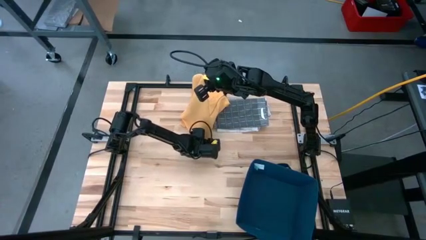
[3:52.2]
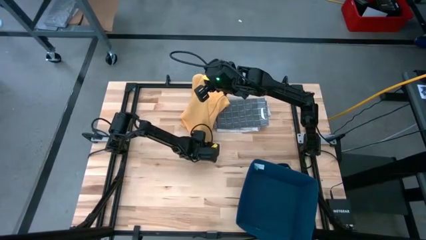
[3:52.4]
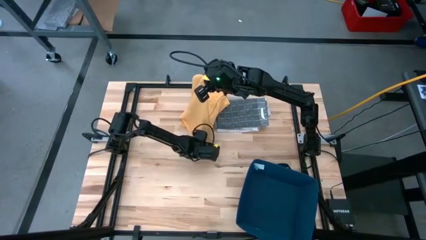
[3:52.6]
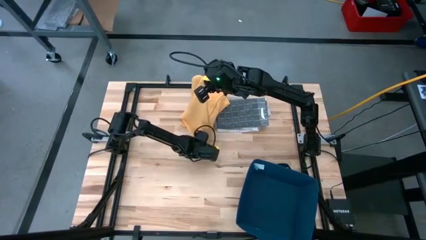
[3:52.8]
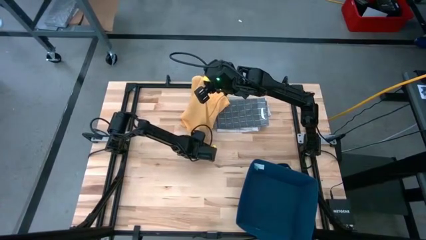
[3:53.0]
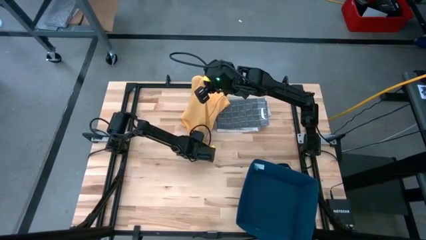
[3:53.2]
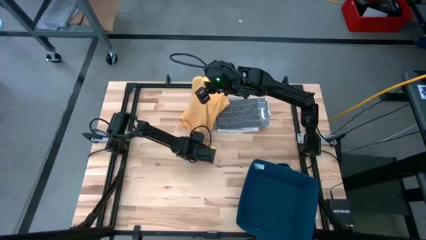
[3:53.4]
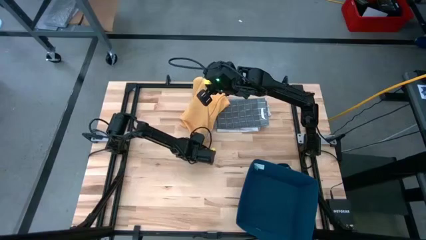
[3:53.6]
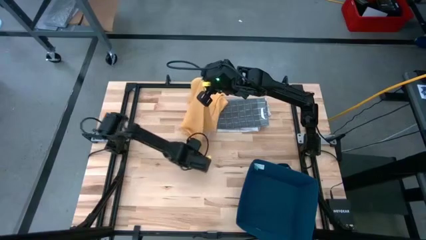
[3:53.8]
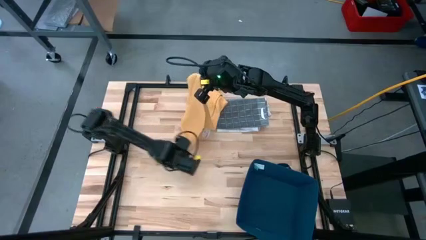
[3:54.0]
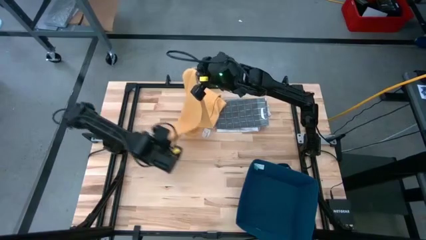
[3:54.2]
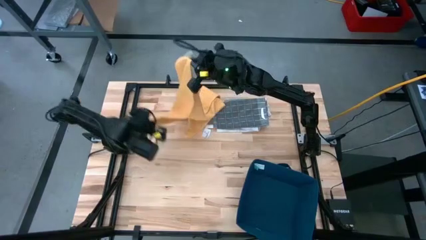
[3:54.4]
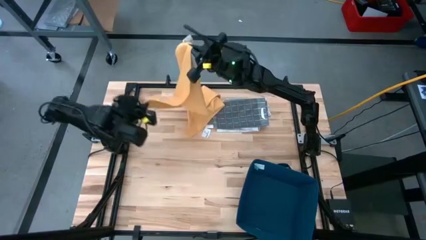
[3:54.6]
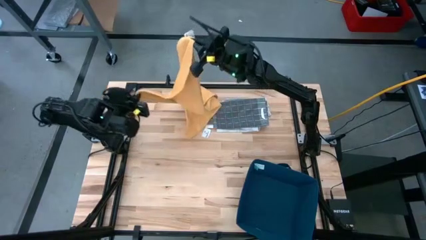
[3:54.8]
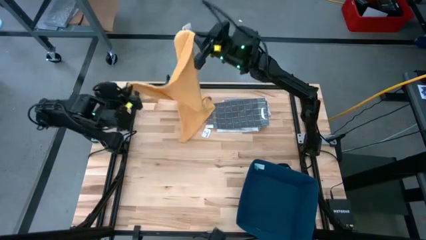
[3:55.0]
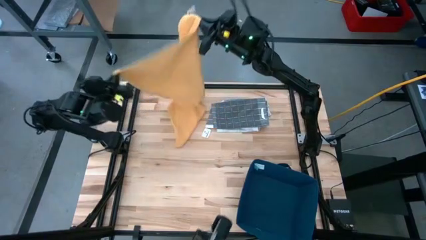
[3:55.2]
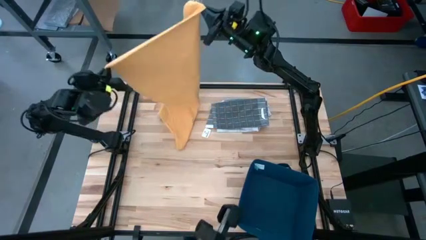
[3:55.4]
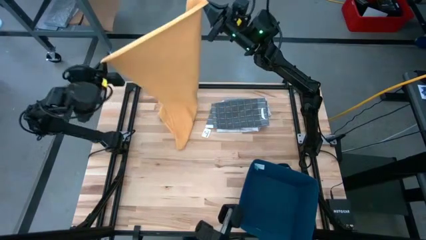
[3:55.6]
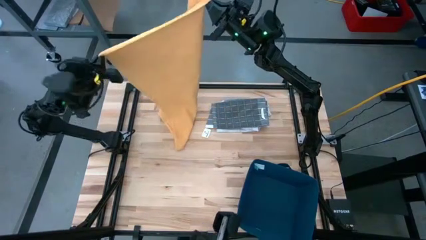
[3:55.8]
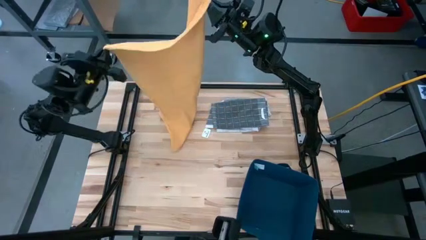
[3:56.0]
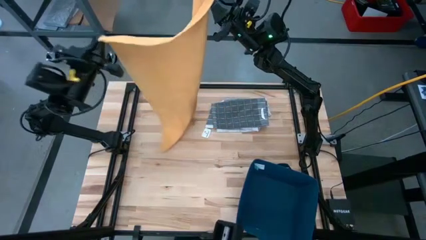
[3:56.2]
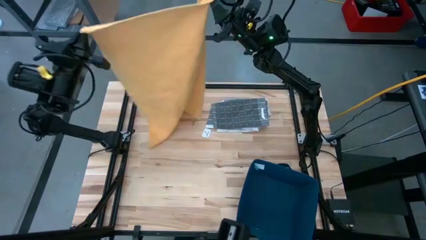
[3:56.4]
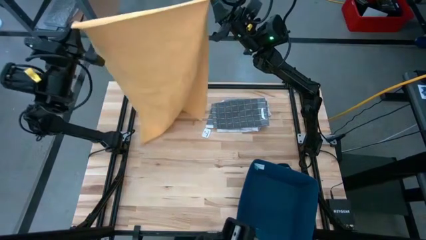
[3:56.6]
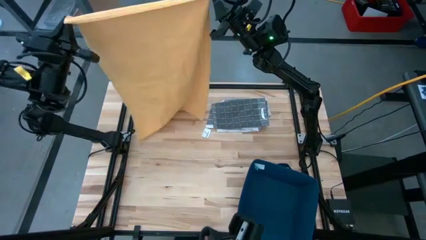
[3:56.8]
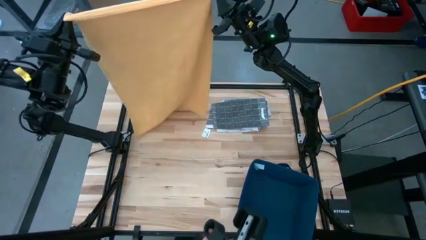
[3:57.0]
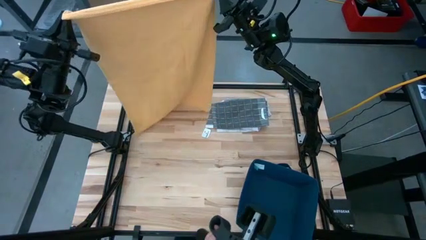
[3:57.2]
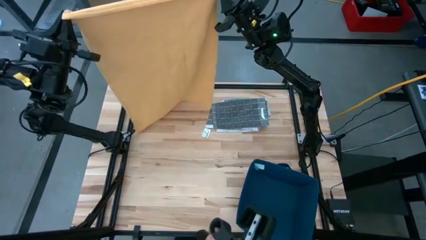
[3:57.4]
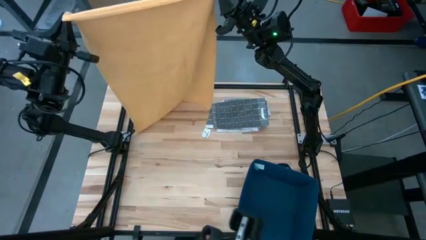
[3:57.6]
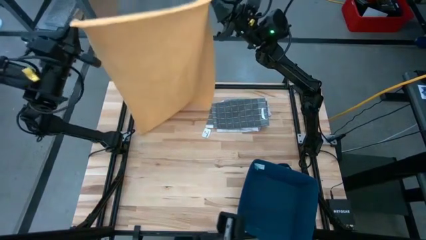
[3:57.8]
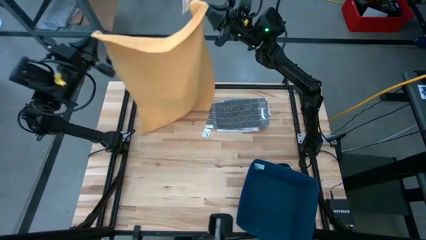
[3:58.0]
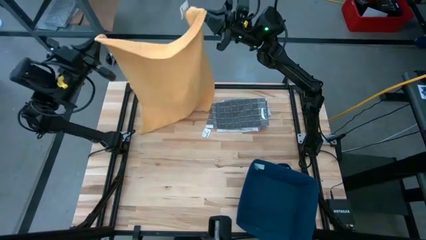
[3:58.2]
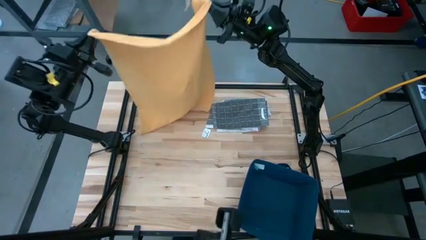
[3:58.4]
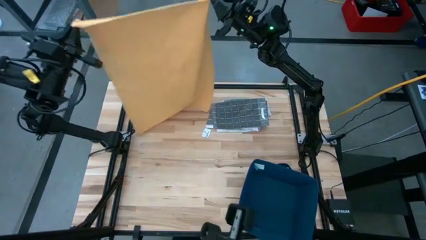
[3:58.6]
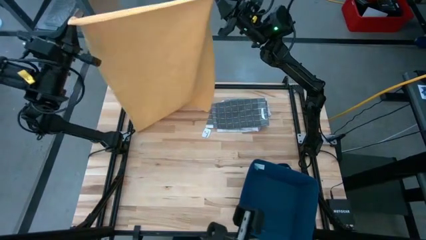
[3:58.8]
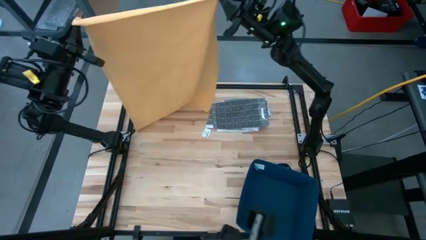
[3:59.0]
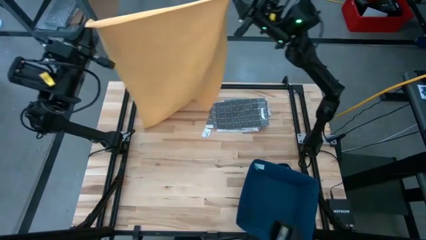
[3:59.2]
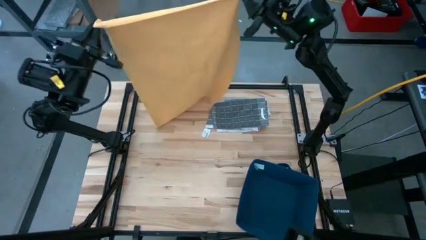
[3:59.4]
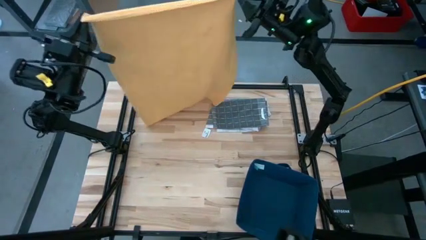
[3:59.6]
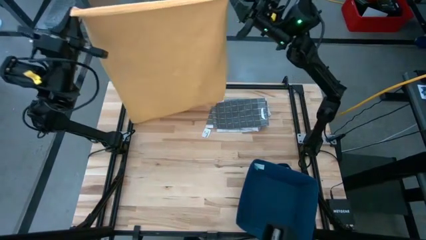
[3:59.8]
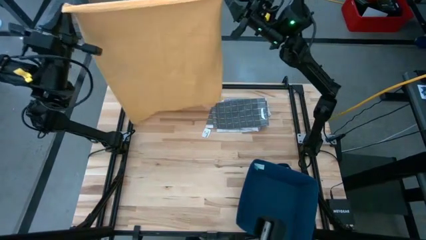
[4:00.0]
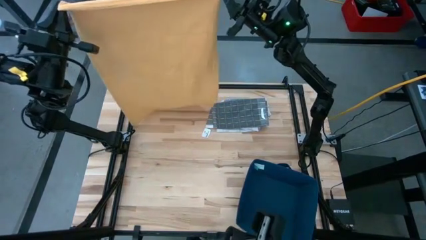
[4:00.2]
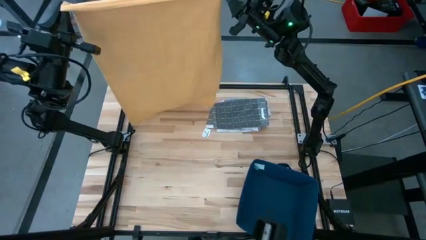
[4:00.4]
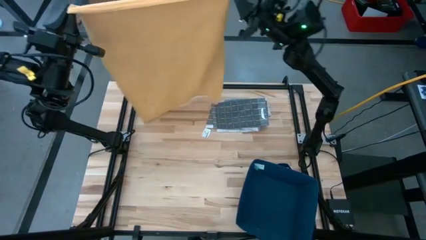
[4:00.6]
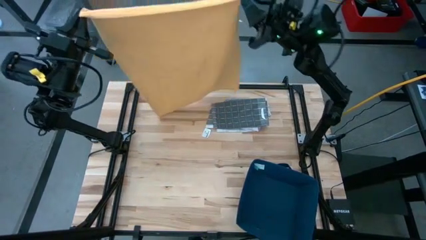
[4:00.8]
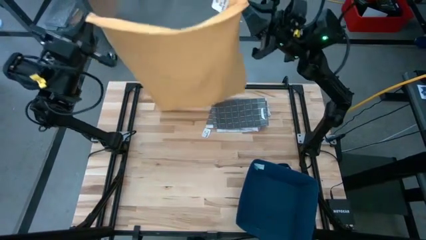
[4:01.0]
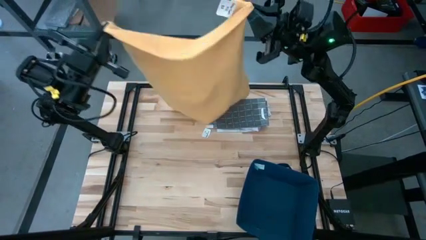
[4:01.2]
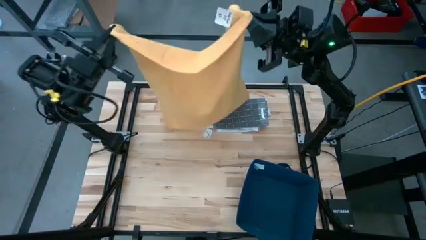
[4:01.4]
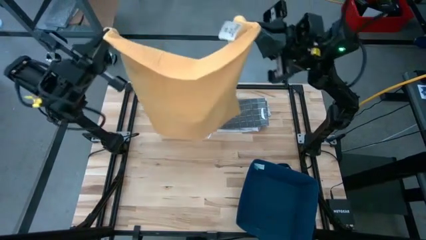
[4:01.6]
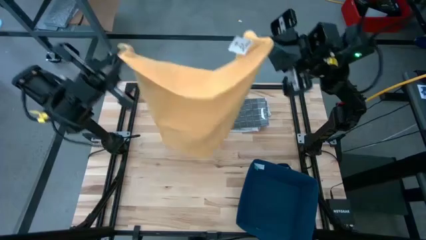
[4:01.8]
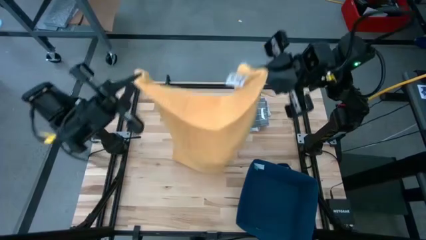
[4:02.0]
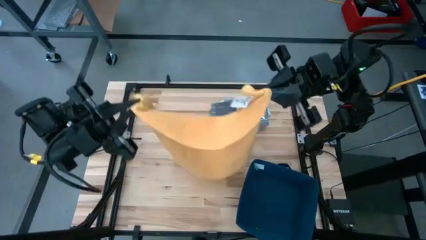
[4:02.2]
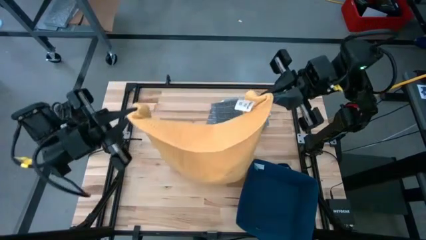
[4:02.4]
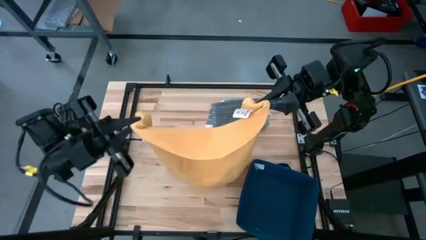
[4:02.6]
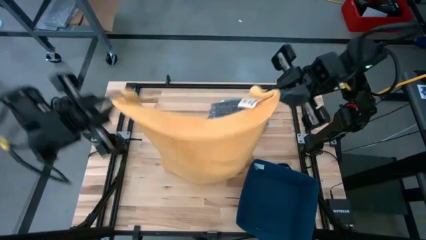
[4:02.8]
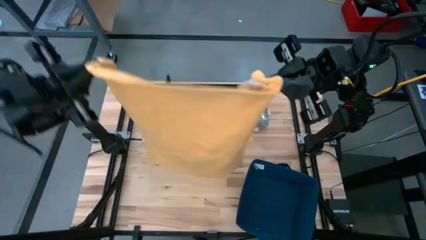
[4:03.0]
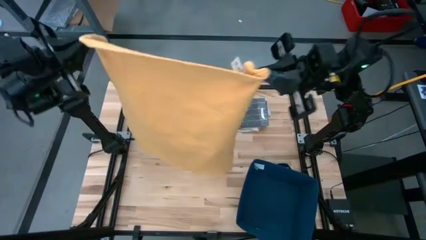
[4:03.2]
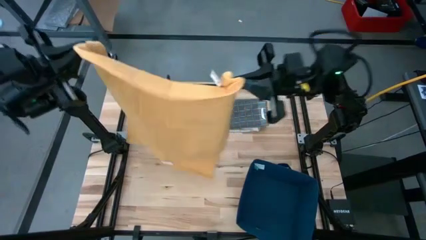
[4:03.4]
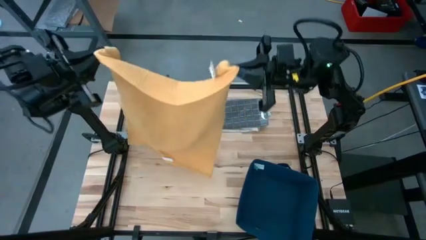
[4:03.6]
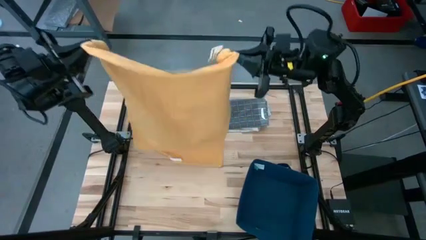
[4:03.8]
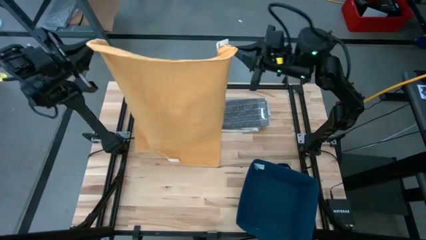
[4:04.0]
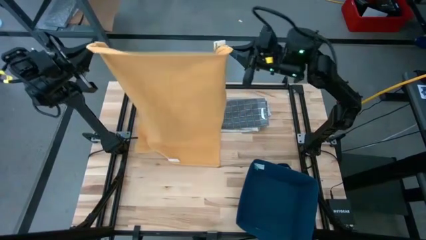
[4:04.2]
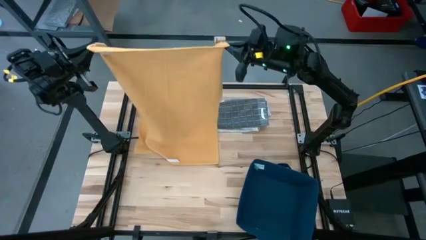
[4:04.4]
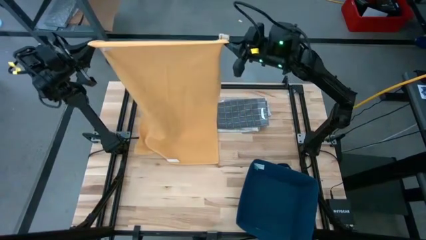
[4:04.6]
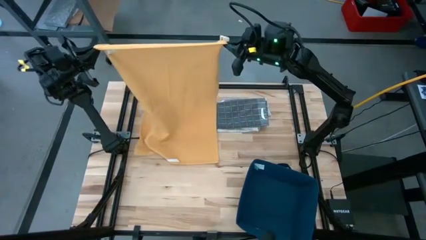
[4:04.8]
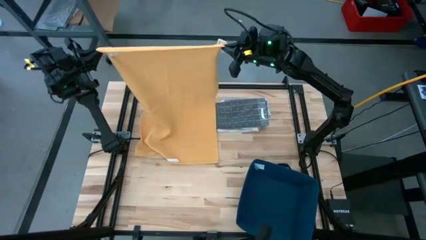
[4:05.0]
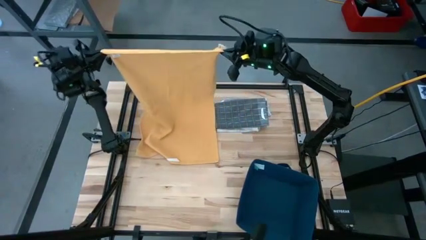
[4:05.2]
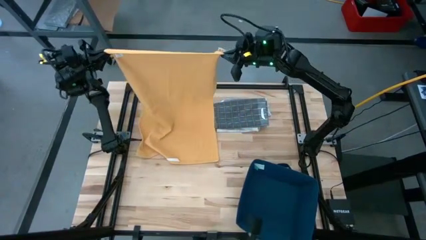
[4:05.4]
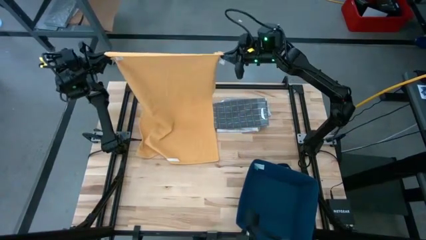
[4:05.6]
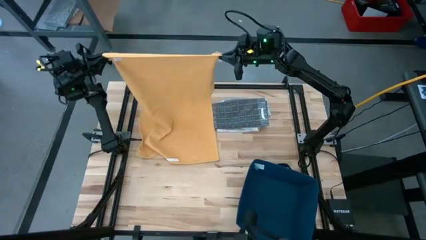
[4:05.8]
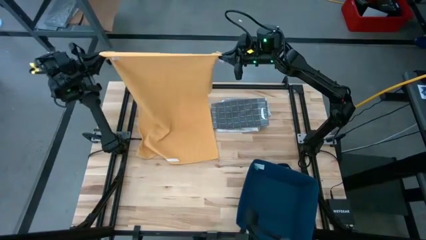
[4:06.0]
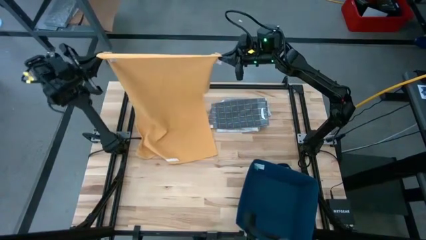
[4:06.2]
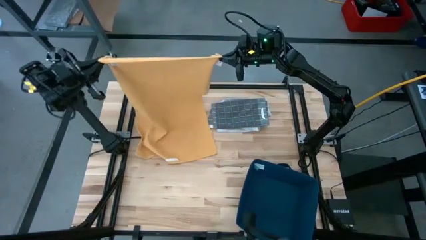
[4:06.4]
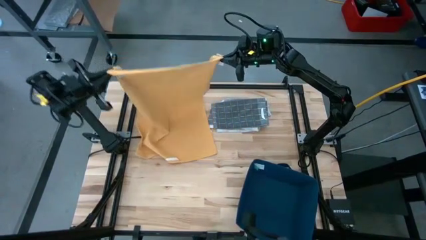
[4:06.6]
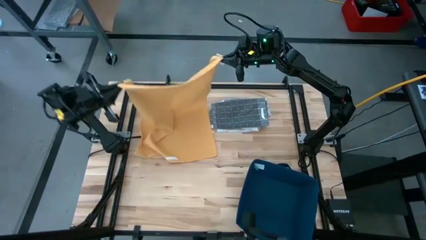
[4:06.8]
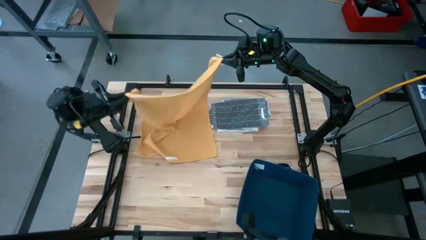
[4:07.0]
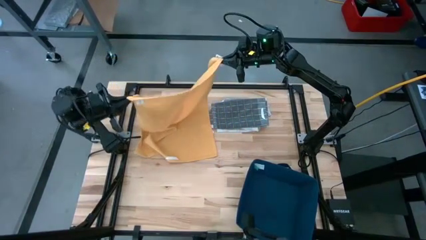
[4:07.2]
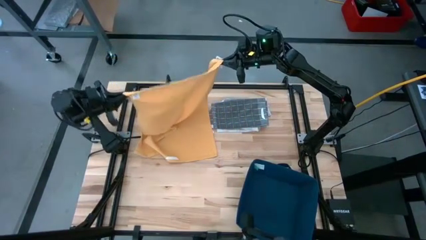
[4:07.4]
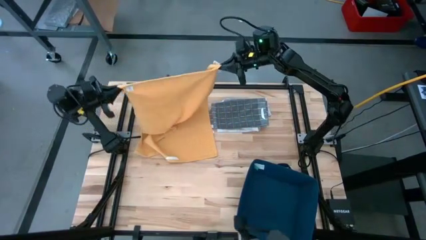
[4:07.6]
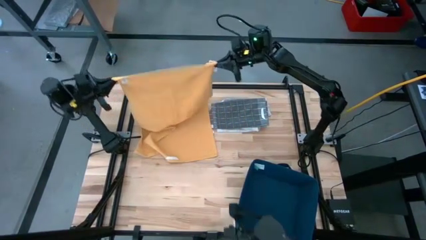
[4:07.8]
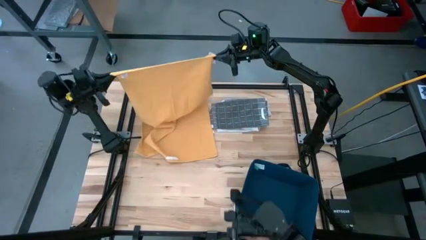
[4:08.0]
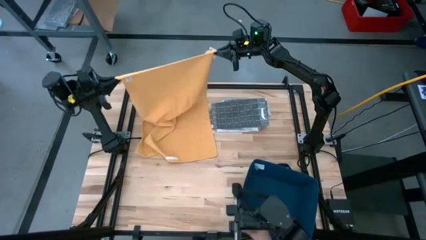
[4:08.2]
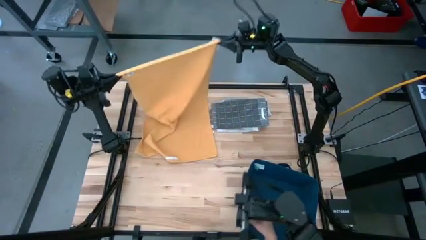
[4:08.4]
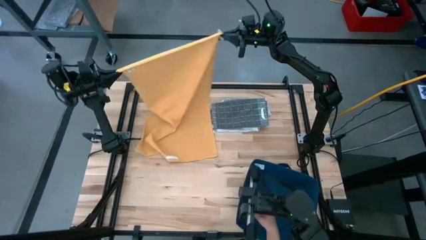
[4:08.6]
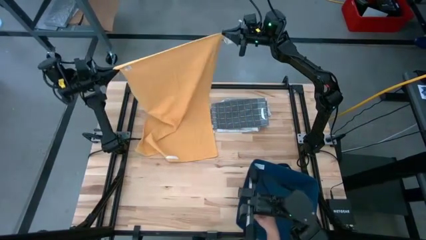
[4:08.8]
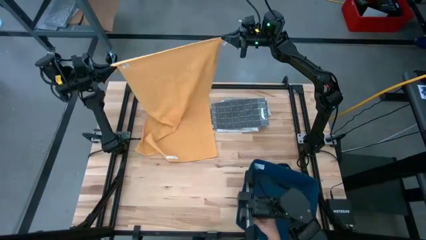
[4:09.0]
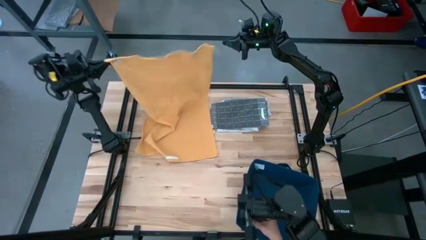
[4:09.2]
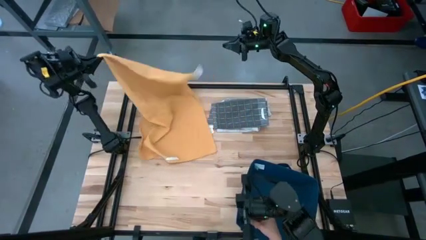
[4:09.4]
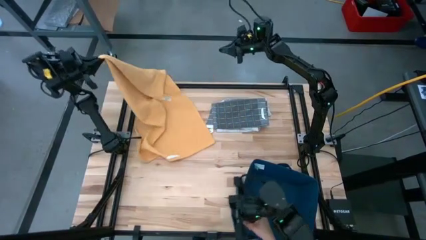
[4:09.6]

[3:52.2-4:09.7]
Task: Fold towel
Fold the yellow kitchen towel
